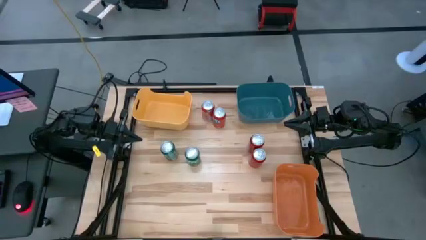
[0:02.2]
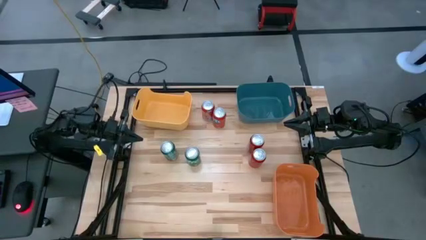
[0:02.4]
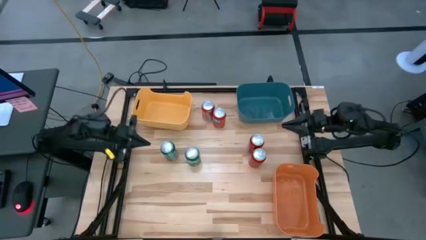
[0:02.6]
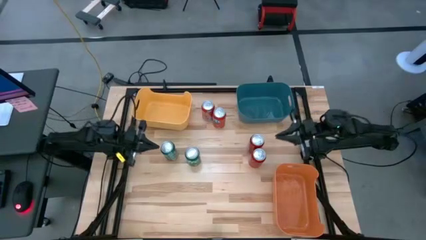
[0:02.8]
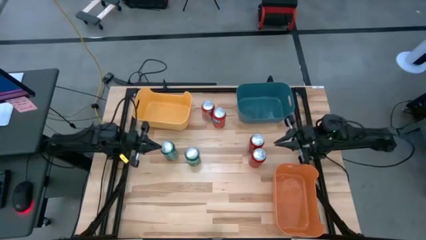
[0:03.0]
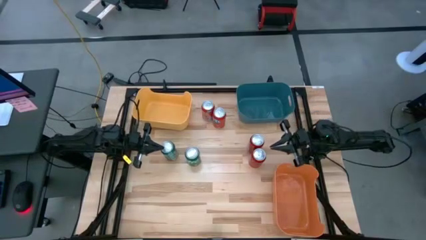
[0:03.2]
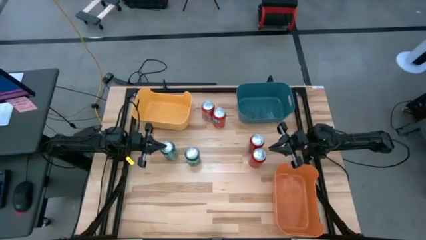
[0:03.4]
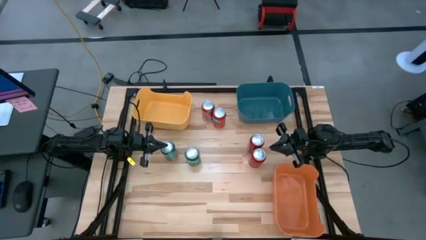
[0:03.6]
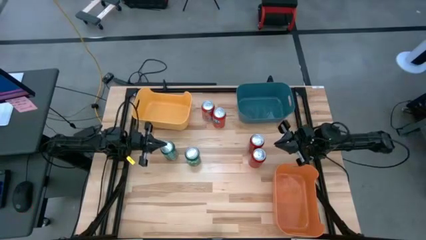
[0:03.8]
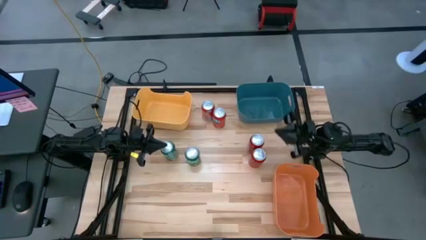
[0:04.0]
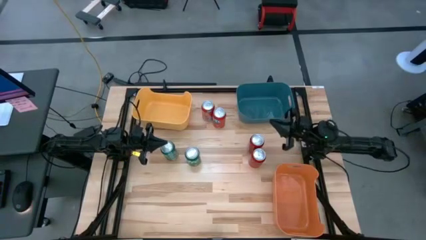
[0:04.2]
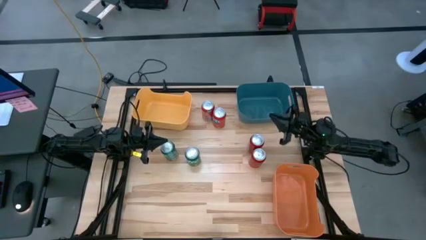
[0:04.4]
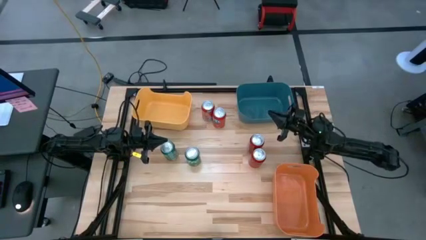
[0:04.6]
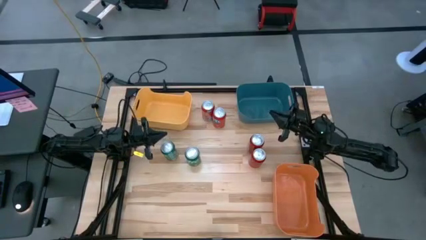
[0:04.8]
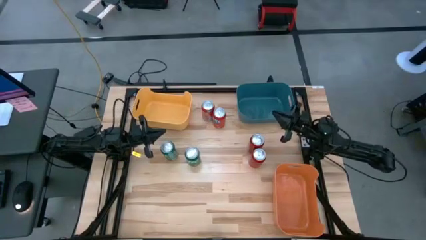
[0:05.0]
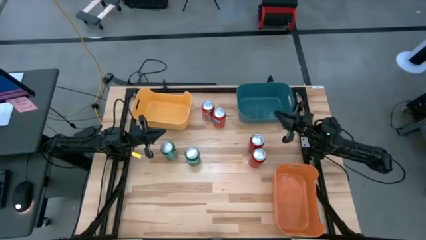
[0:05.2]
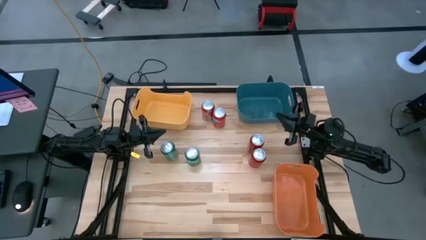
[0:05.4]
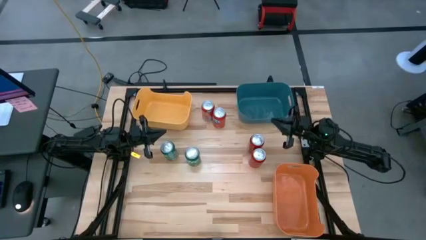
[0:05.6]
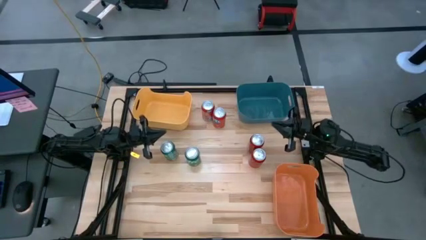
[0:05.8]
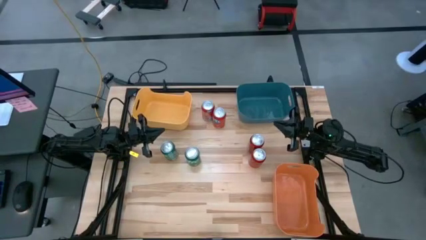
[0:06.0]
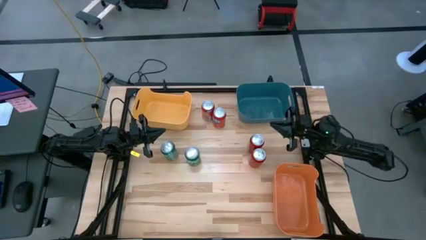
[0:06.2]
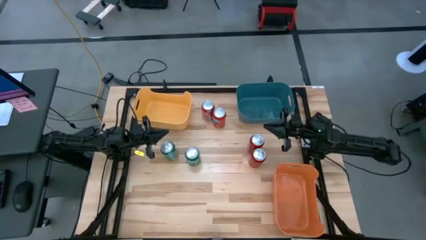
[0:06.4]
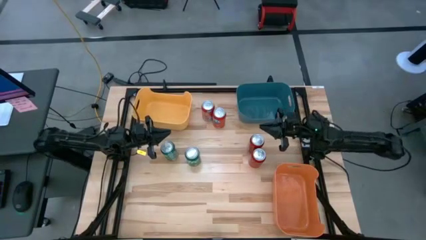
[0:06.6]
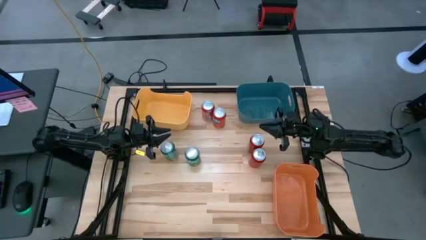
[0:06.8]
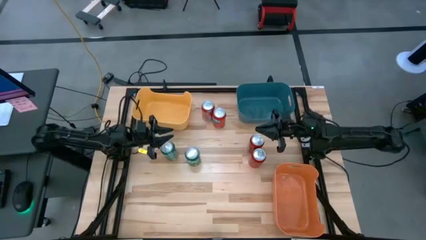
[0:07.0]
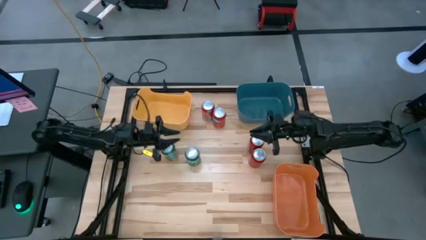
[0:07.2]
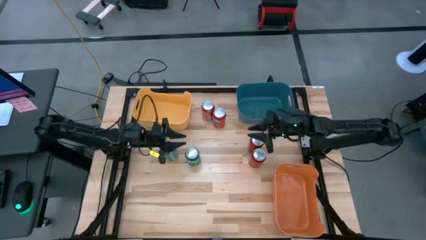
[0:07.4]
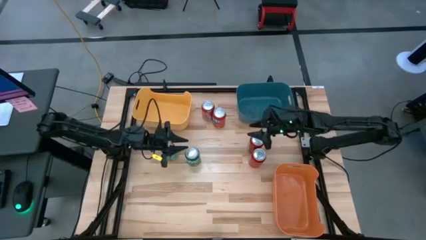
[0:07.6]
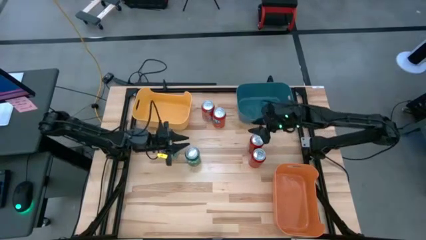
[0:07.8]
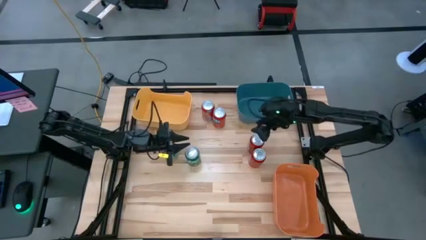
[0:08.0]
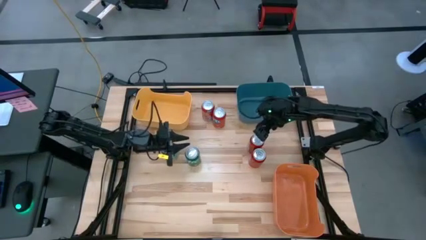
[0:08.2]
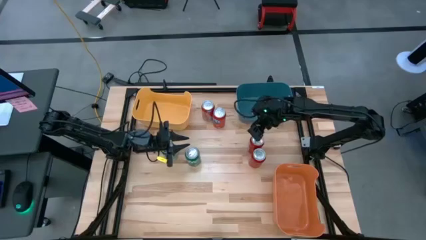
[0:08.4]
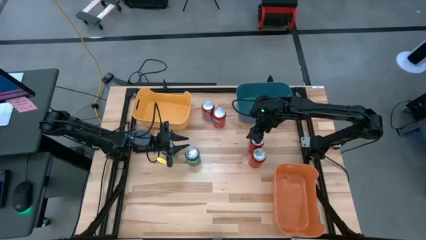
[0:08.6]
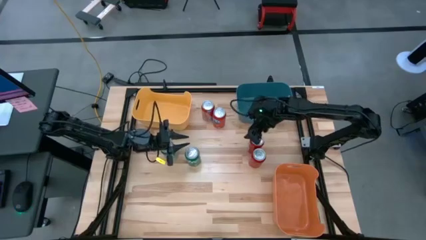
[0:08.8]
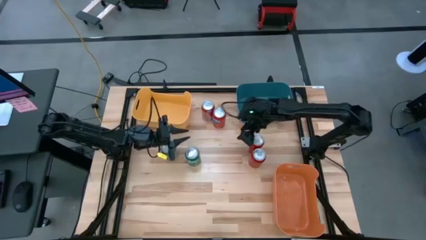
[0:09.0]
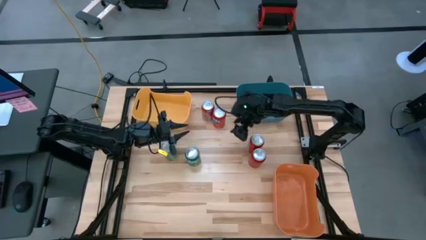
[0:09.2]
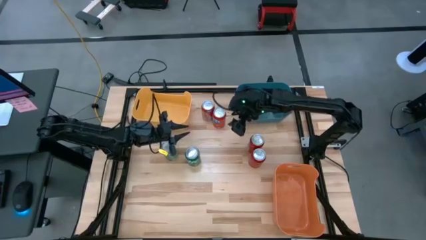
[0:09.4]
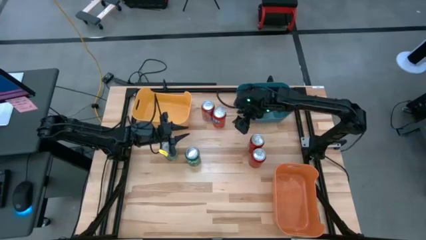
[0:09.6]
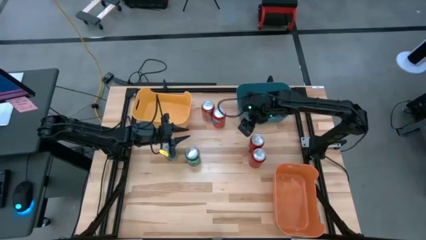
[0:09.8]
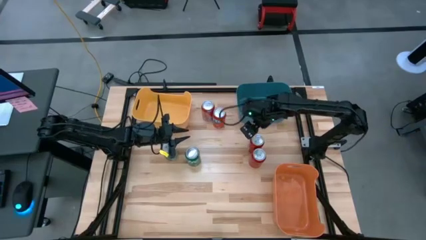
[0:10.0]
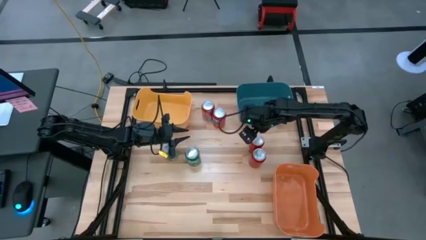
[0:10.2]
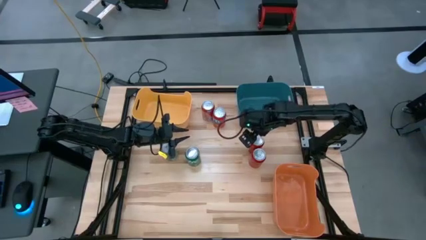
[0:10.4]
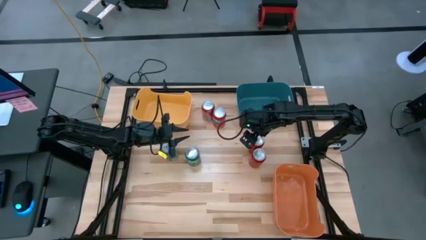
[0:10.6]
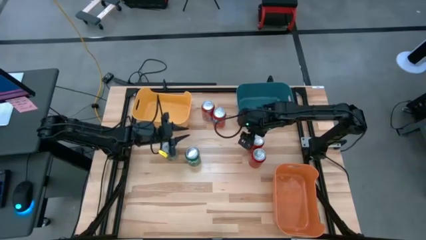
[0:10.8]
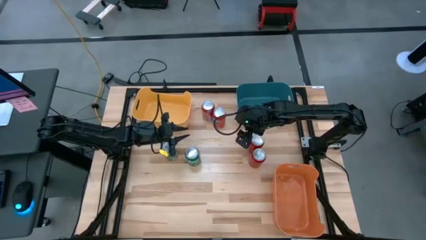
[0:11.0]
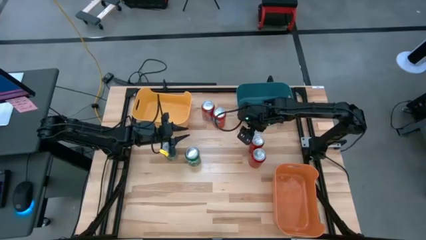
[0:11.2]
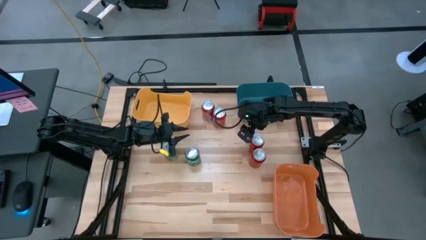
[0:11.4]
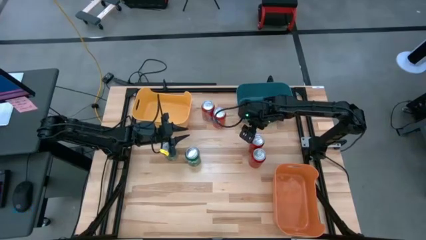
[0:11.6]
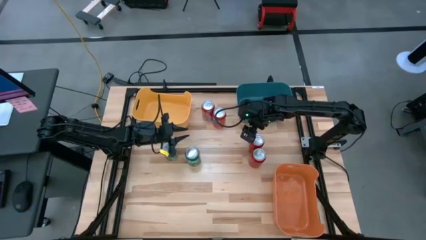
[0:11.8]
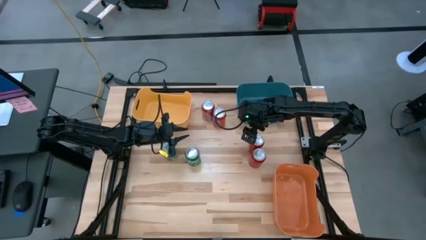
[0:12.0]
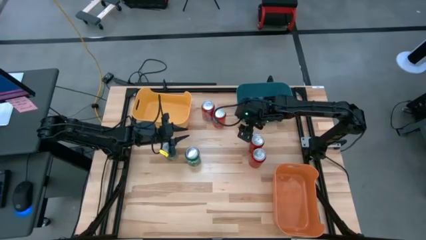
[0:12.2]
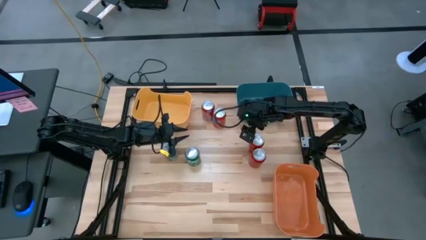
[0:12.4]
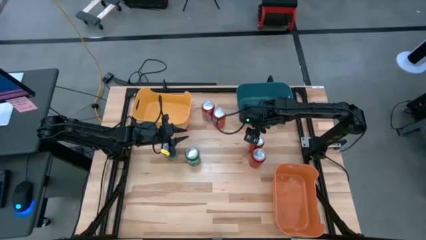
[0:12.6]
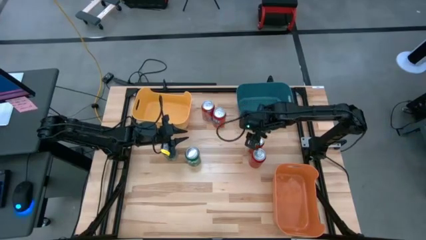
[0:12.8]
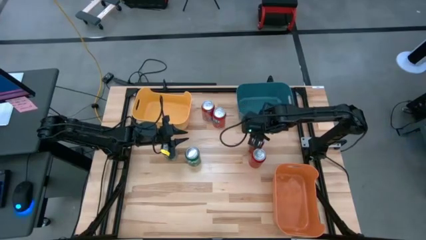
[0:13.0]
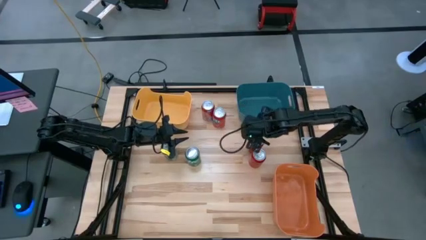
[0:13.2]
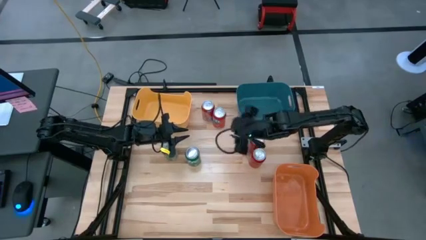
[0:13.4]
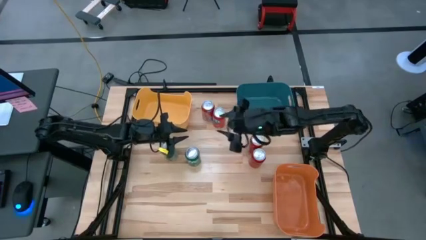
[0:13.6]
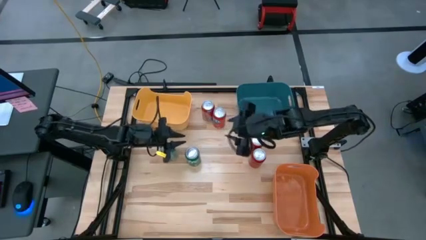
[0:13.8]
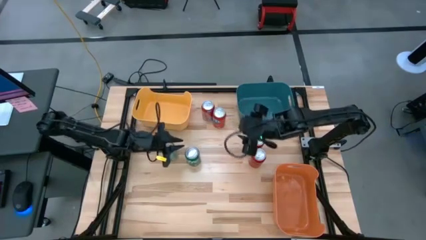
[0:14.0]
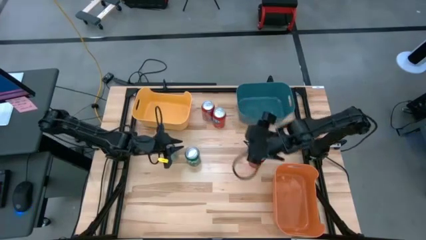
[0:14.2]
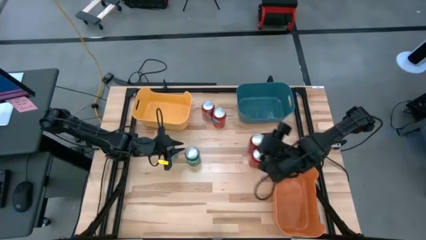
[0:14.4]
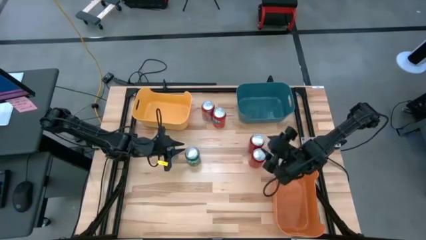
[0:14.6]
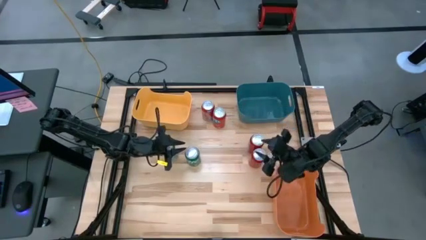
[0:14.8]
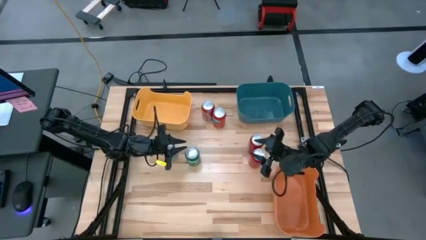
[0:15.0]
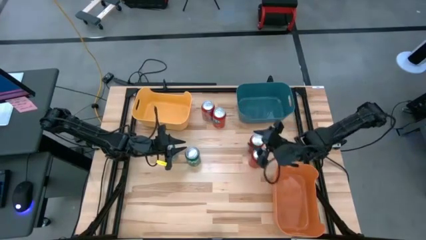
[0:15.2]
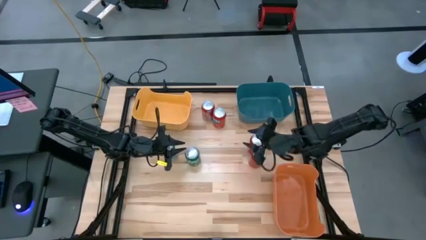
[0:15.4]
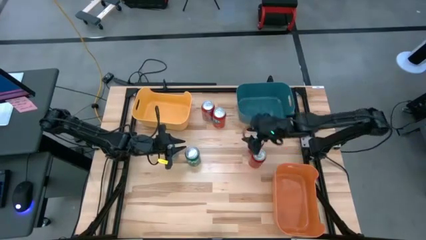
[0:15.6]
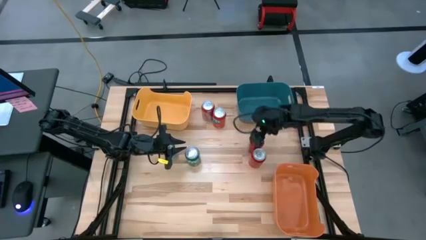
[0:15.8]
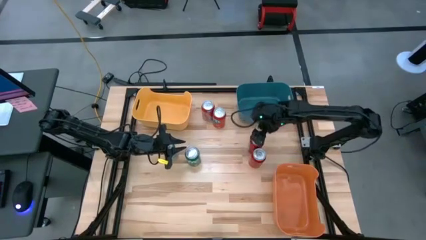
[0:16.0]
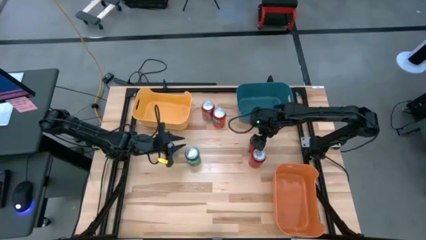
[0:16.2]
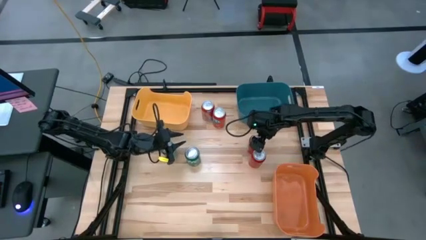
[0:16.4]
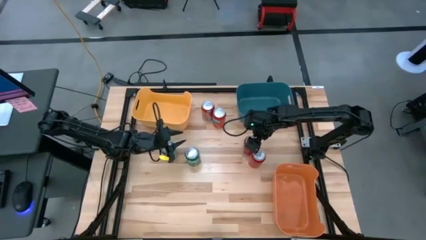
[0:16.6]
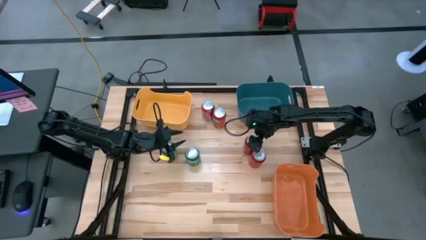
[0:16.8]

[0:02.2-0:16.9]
Task: Sort soda cans
Put the top red-black soda can into the blue bin
